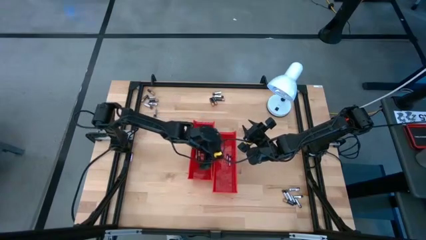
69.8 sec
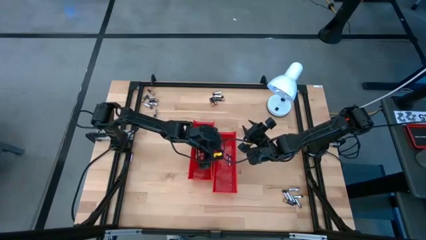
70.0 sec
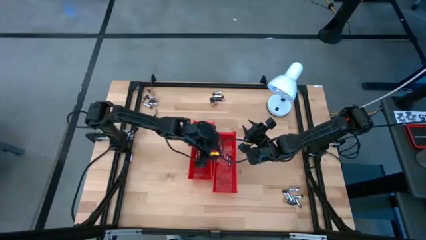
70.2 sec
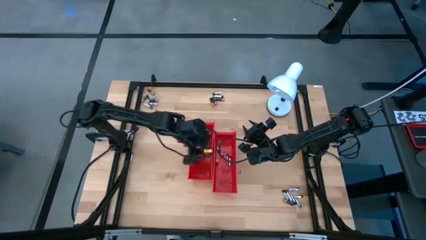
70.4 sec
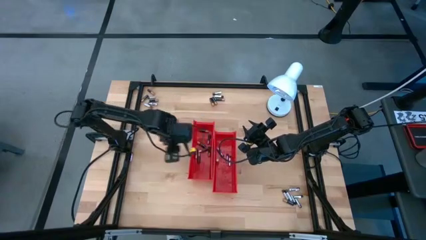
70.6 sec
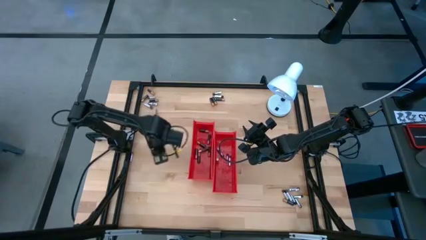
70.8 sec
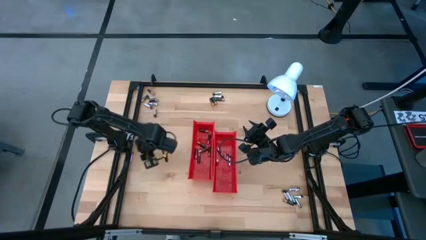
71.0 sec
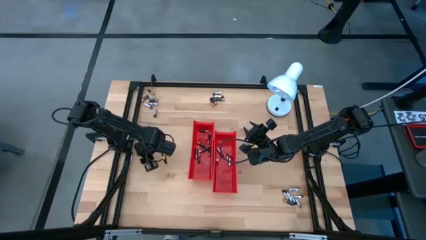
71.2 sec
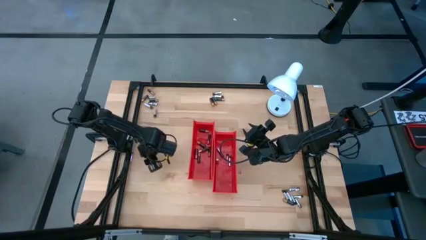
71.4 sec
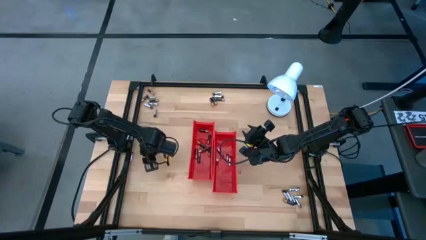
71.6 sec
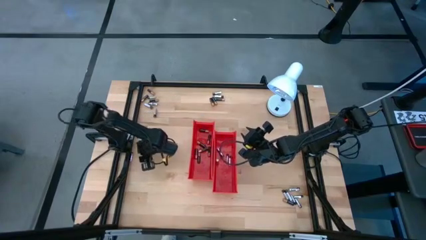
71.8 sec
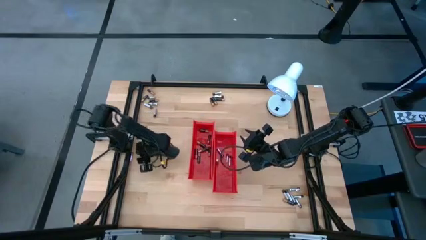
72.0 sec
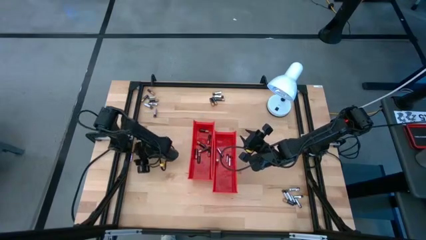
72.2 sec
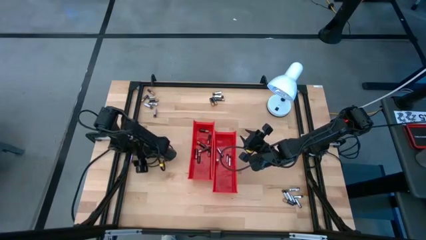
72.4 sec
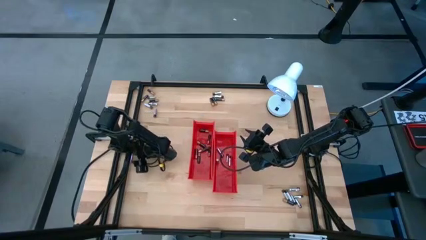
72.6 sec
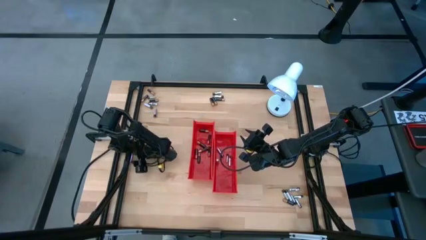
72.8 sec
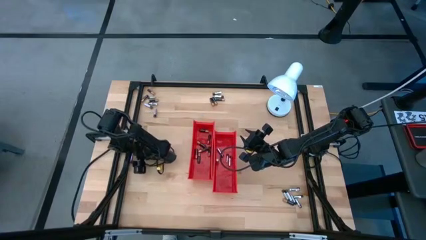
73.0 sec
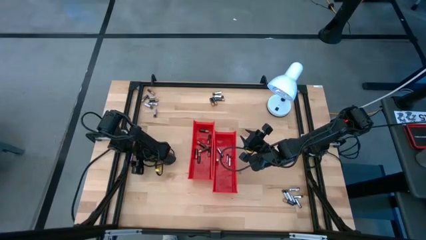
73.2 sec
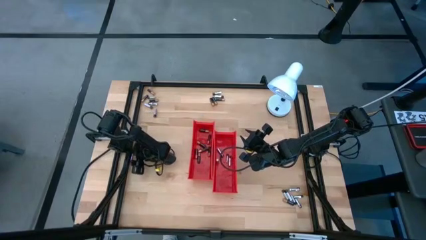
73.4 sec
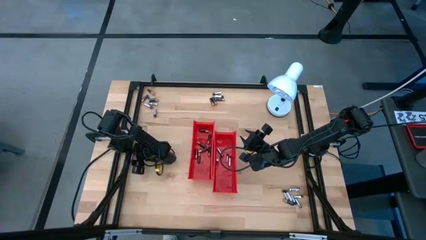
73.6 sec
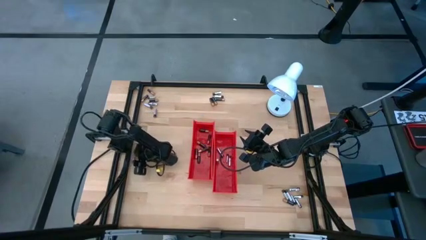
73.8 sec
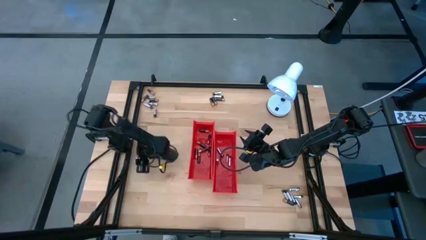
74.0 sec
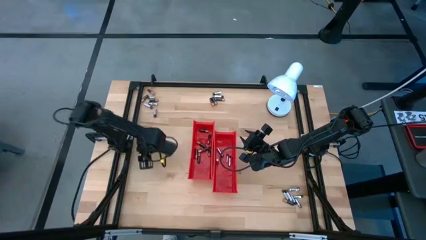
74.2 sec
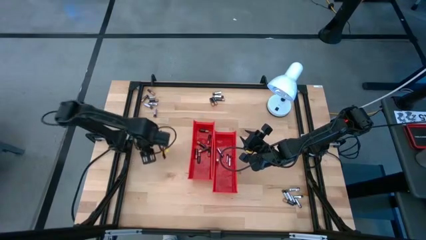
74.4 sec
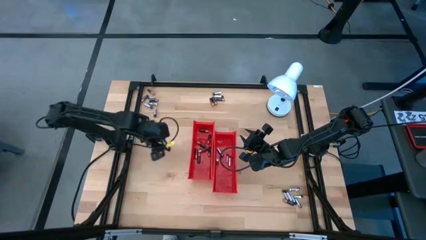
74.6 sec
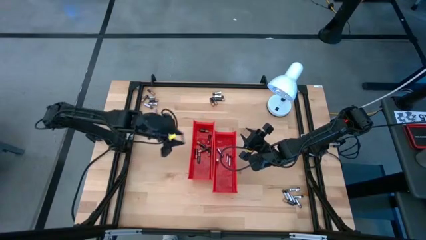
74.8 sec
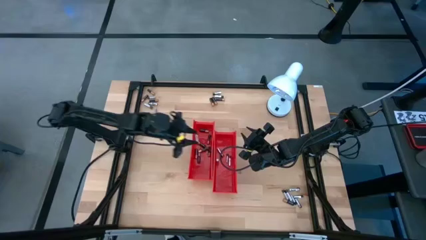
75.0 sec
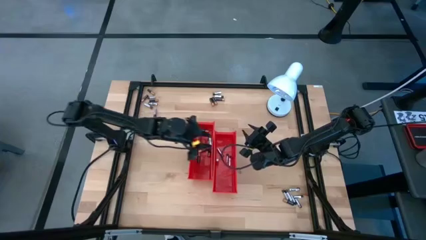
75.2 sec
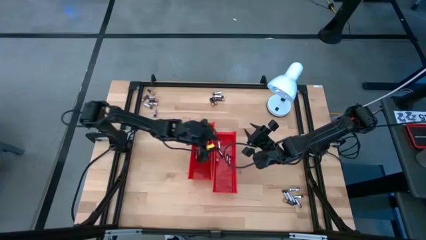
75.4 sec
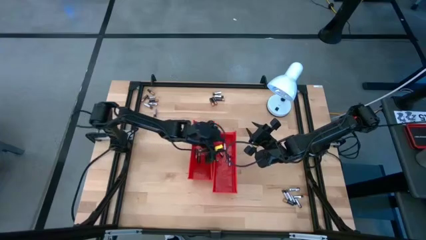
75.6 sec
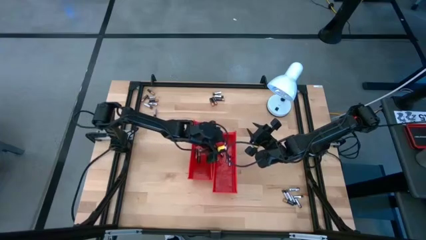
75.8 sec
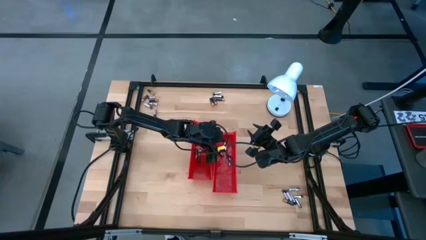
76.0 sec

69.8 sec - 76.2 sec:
Task: Sort batteries
Put the silver battery into the right red bin

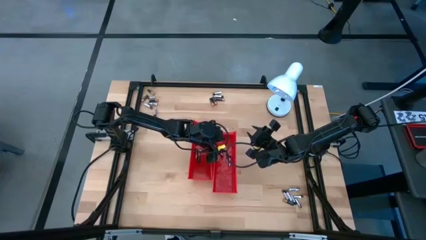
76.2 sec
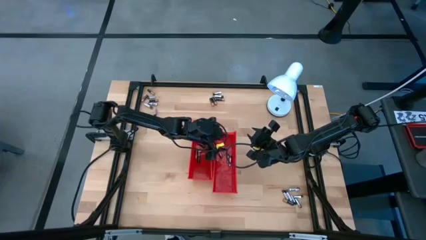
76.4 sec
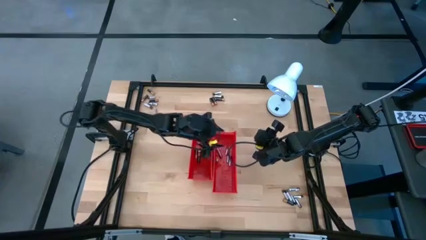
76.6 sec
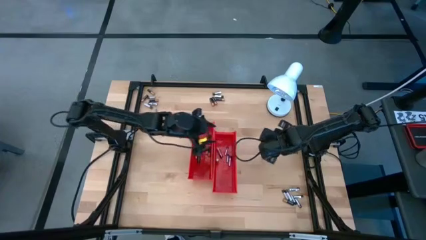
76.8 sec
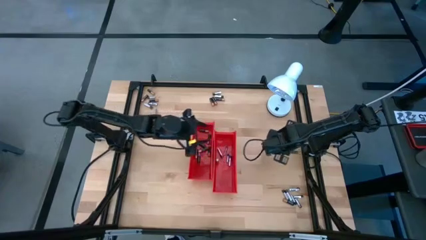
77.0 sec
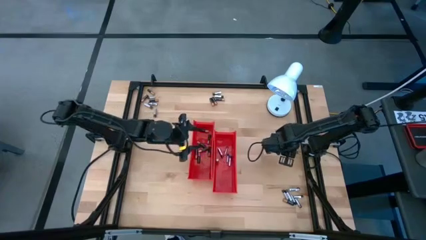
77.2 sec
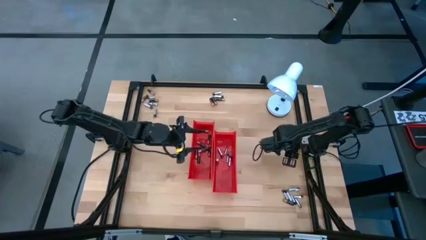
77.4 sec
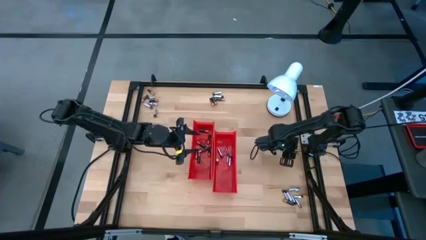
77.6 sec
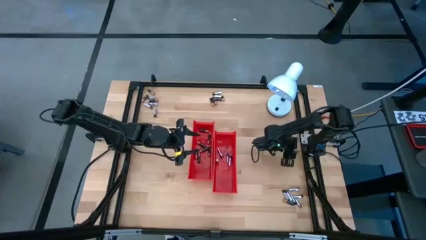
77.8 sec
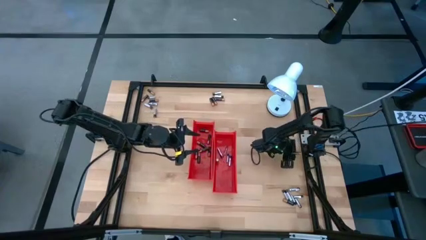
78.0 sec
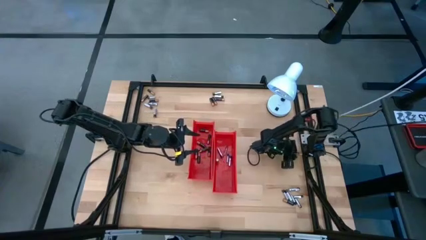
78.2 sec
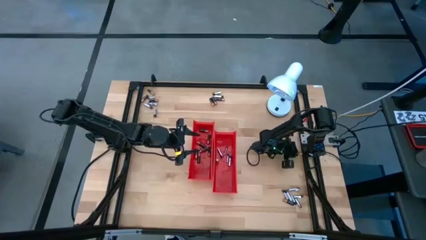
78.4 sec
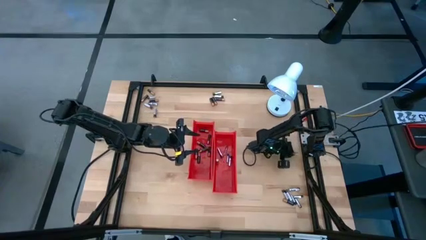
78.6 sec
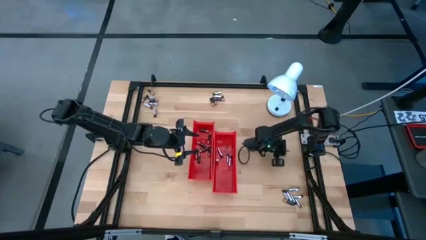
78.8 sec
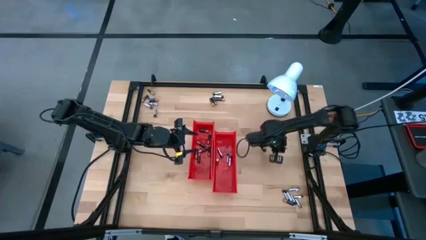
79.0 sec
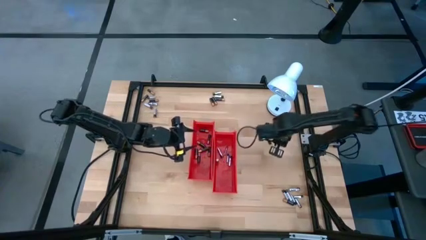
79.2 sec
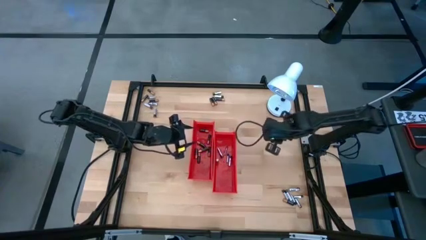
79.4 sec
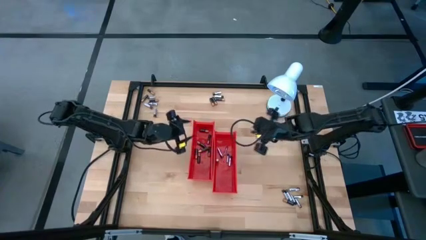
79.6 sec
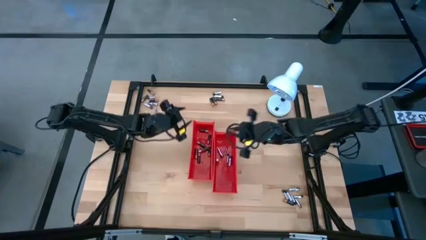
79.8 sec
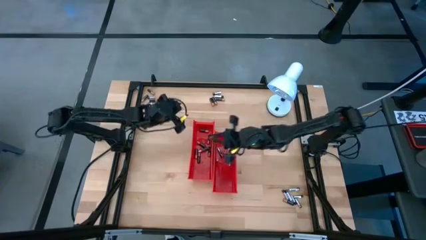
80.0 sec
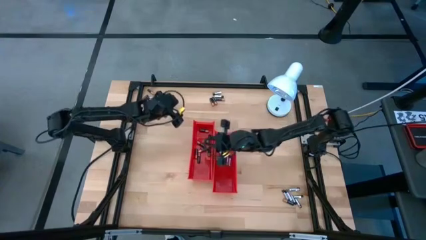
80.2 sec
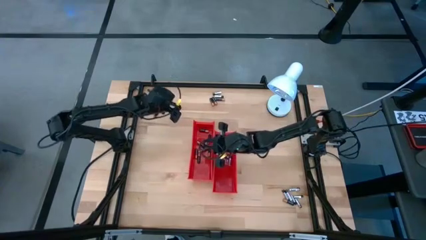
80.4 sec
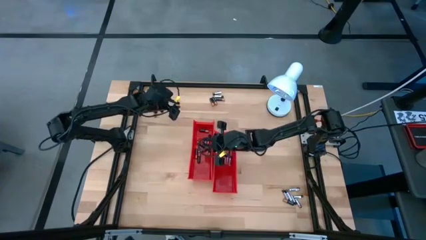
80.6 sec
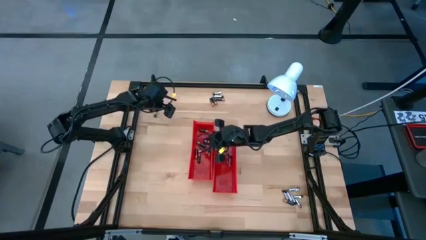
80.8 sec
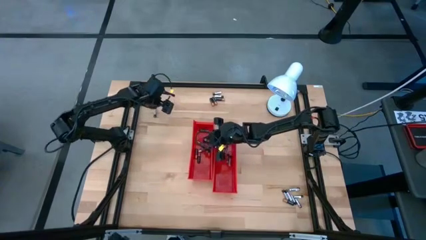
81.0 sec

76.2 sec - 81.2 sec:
Put the black battery into the left red bin

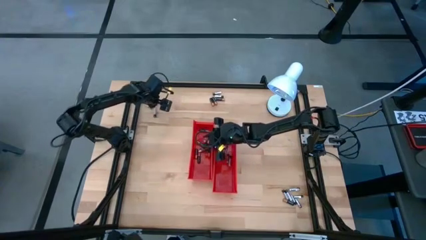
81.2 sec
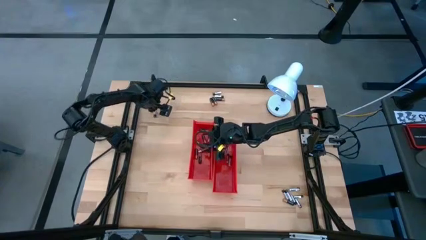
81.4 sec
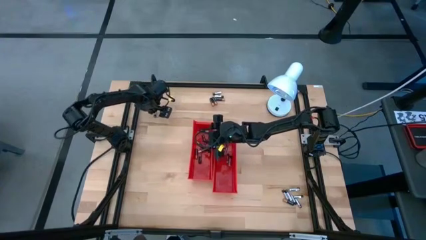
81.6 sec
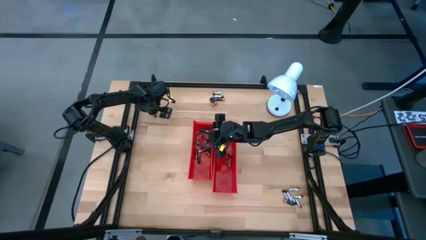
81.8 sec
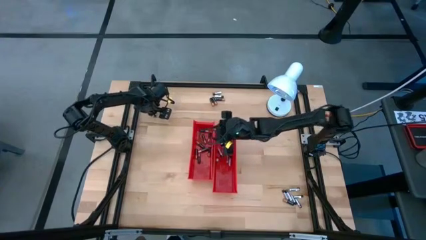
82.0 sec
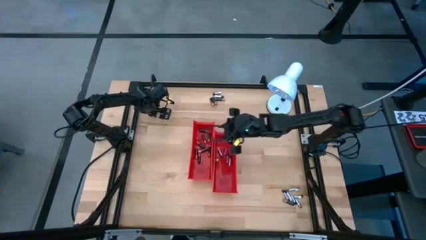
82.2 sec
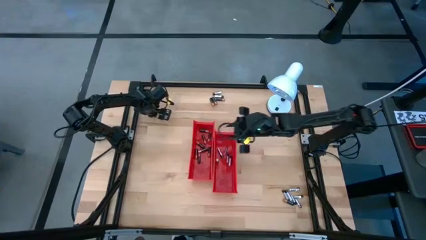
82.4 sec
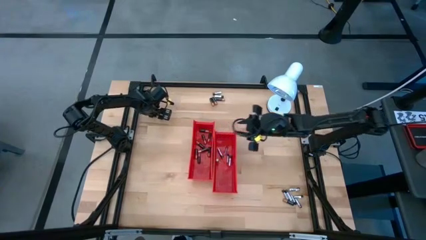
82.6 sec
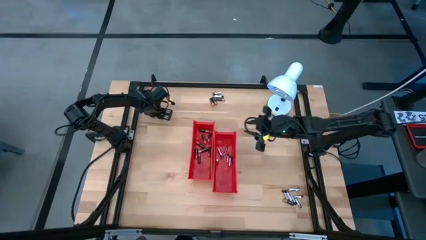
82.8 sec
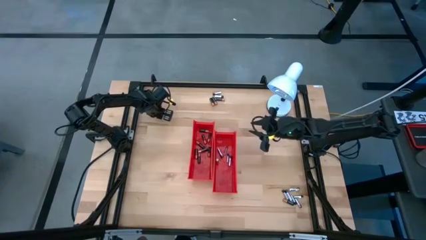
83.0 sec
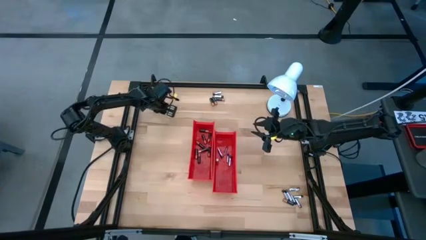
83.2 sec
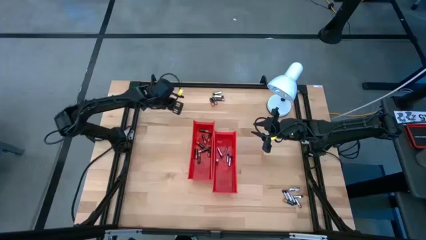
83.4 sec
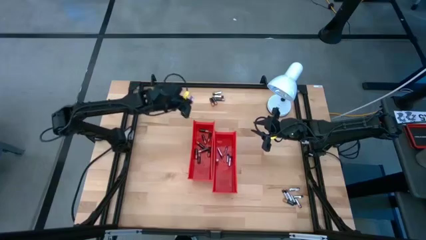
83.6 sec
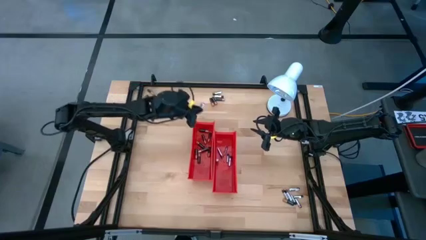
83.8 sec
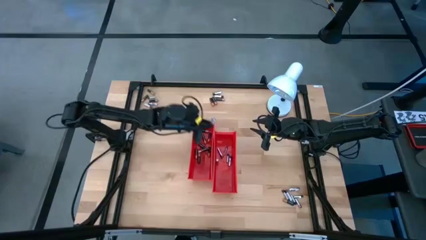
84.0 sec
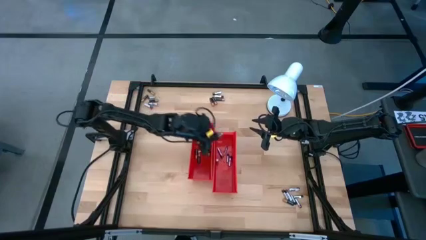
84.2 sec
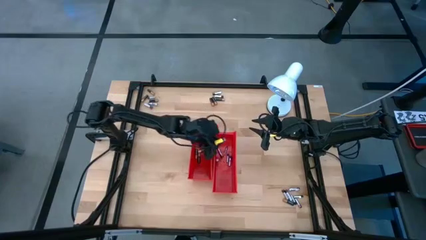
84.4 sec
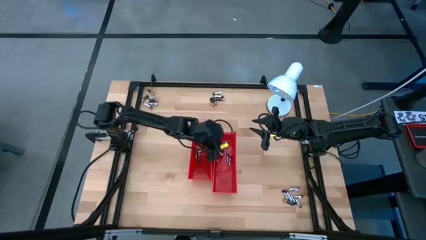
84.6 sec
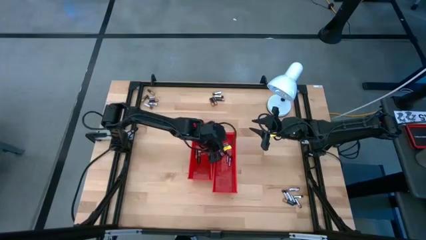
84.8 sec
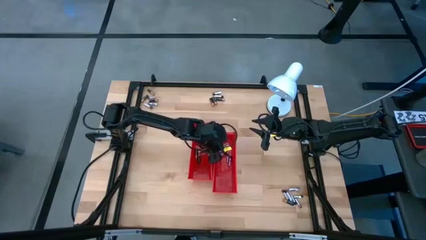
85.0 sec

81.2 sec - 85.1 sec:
Put the silver battery into the right red bin
